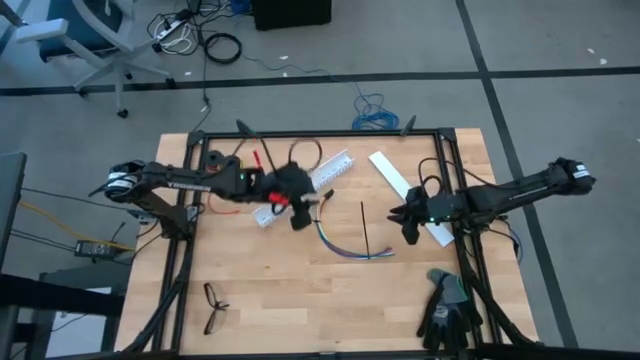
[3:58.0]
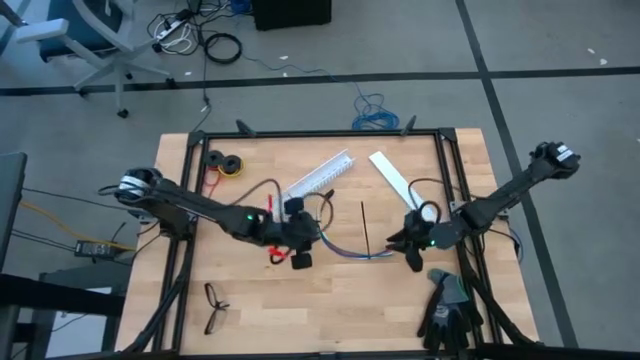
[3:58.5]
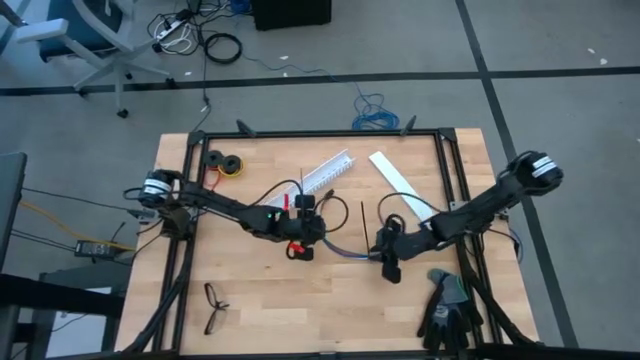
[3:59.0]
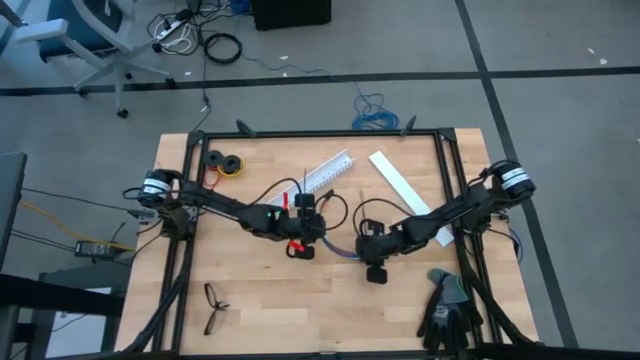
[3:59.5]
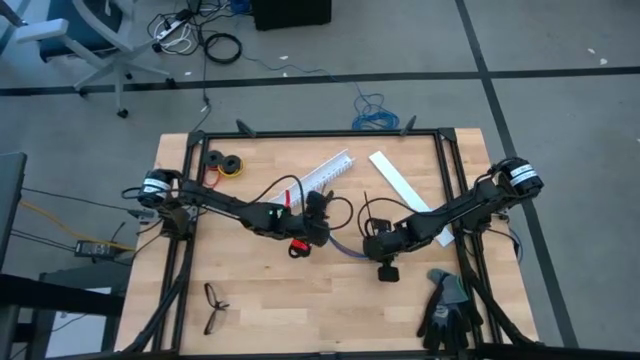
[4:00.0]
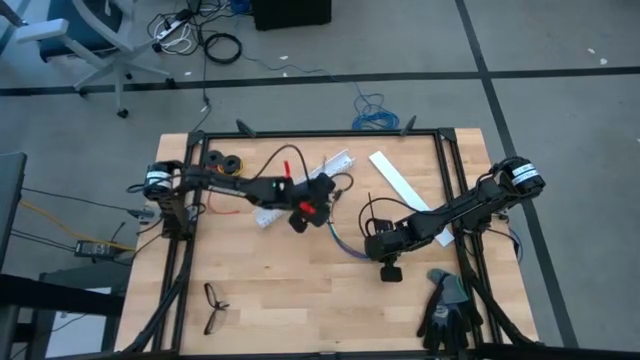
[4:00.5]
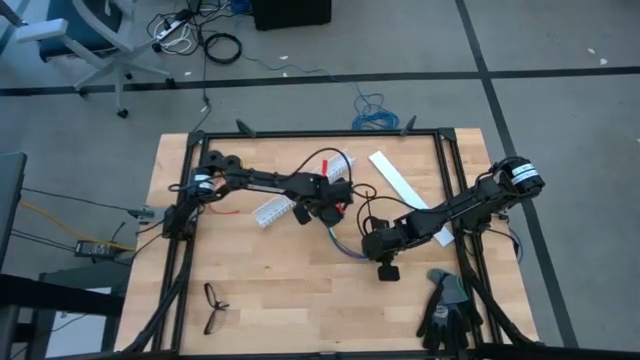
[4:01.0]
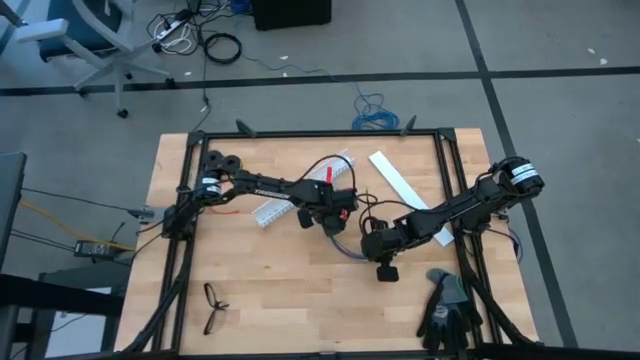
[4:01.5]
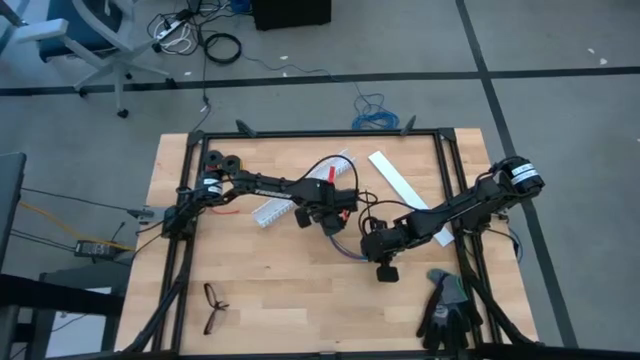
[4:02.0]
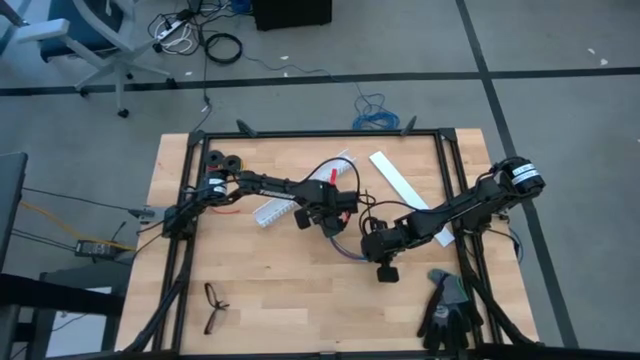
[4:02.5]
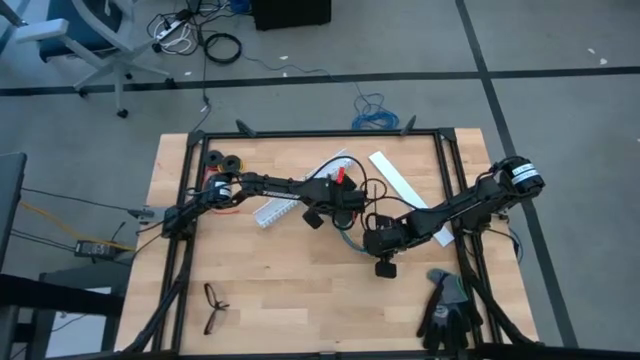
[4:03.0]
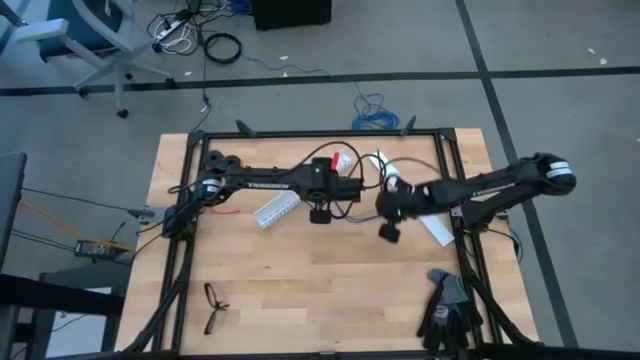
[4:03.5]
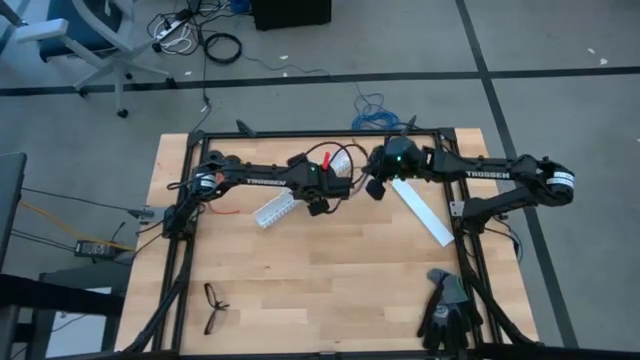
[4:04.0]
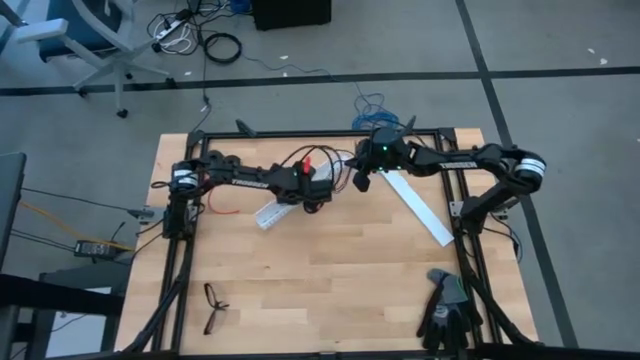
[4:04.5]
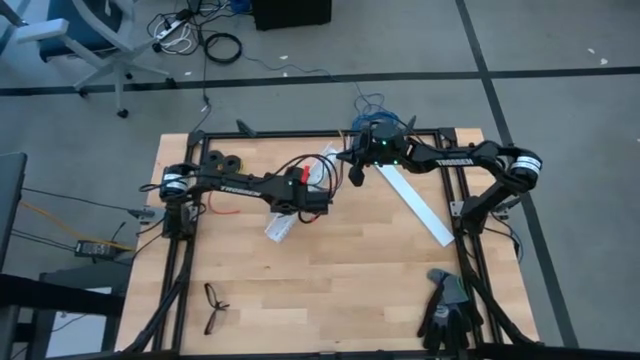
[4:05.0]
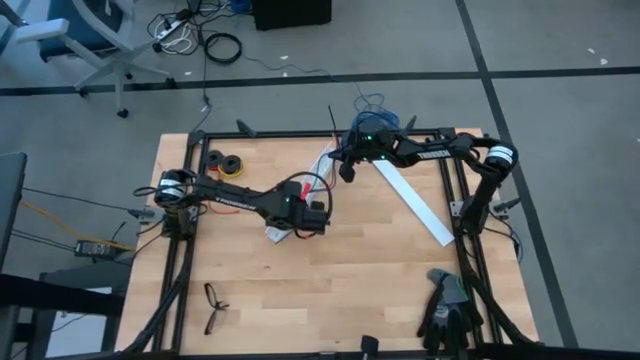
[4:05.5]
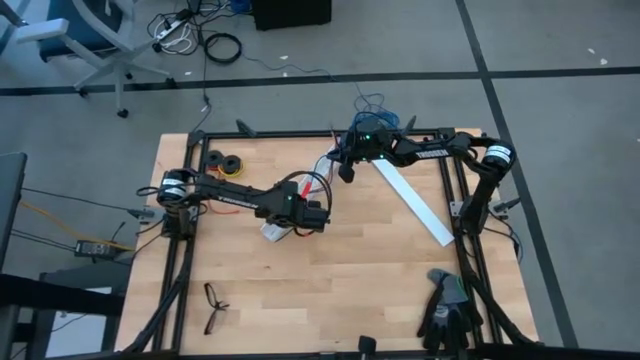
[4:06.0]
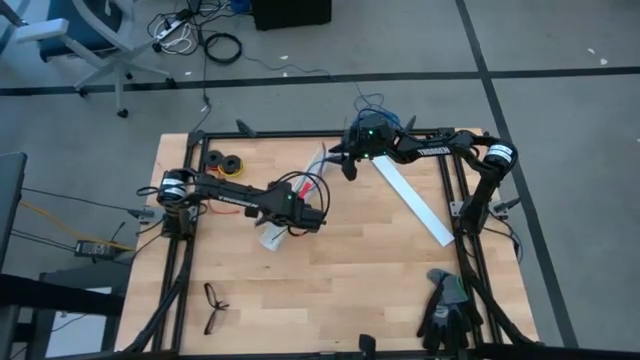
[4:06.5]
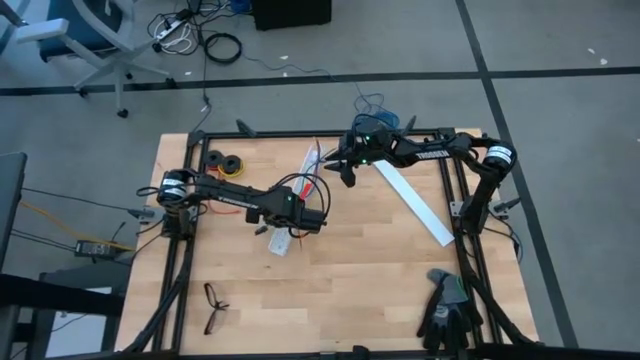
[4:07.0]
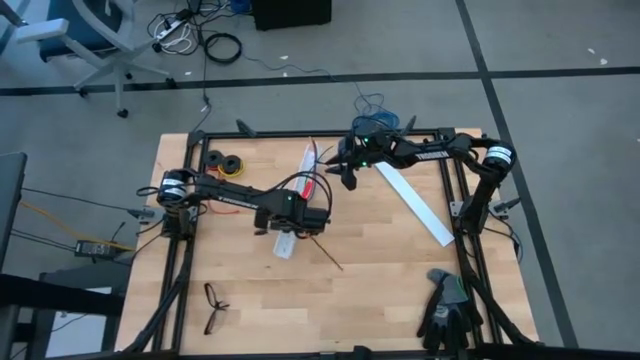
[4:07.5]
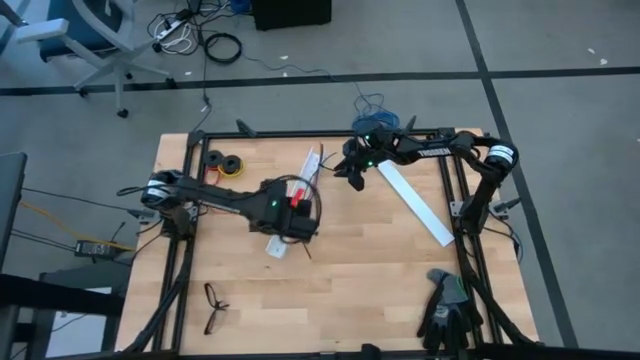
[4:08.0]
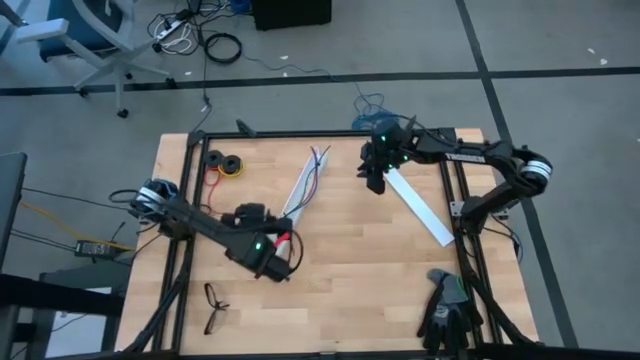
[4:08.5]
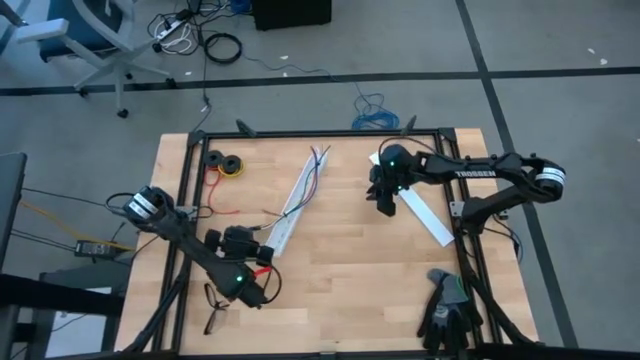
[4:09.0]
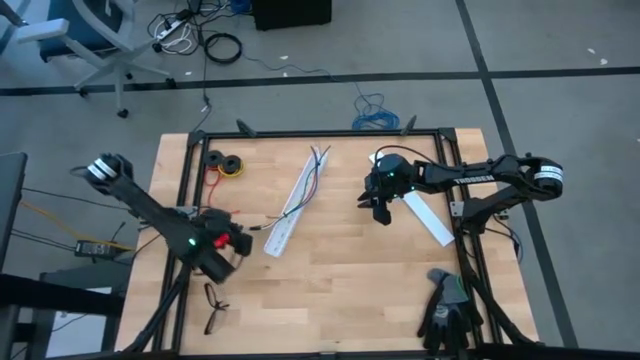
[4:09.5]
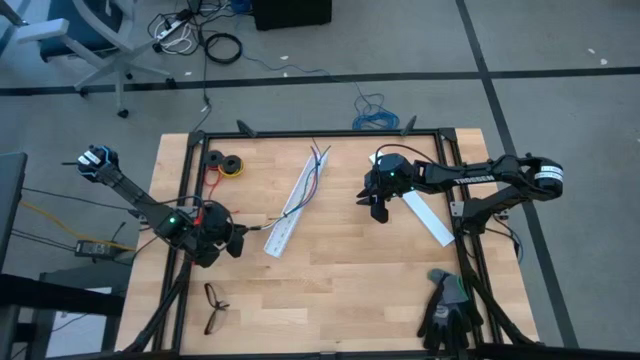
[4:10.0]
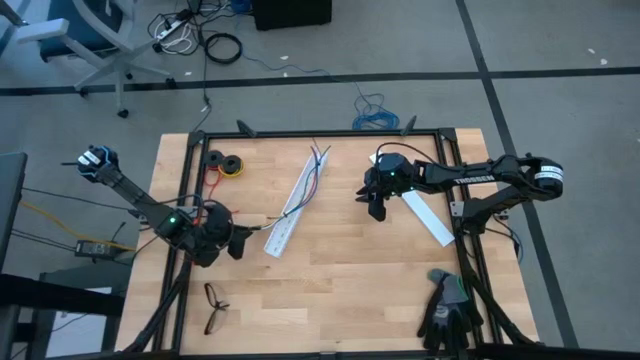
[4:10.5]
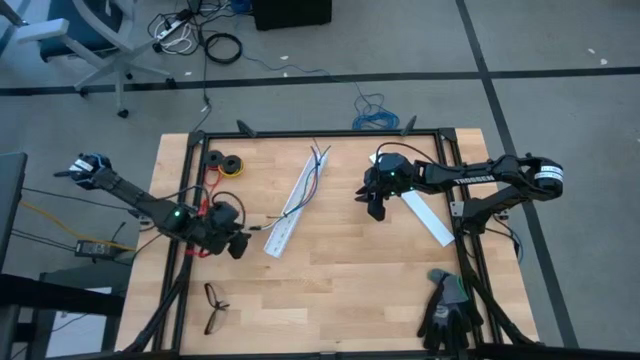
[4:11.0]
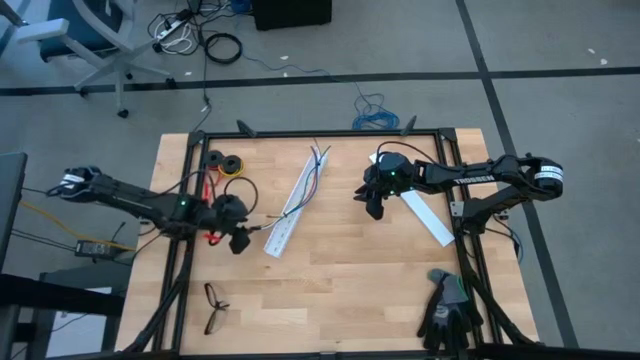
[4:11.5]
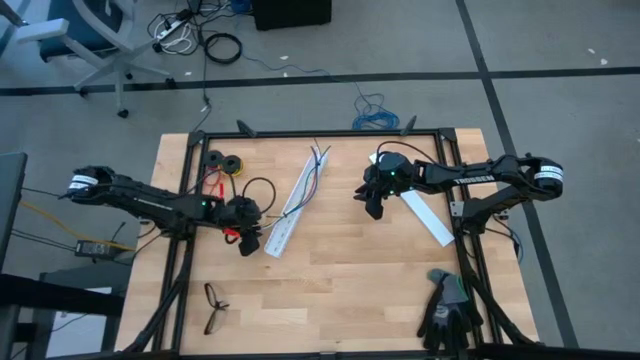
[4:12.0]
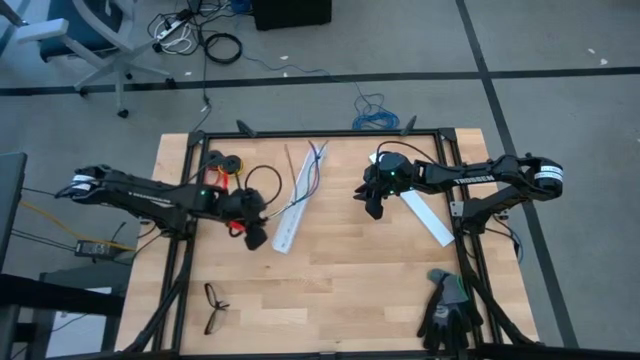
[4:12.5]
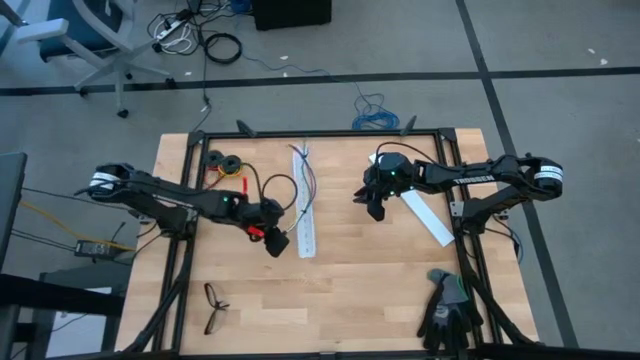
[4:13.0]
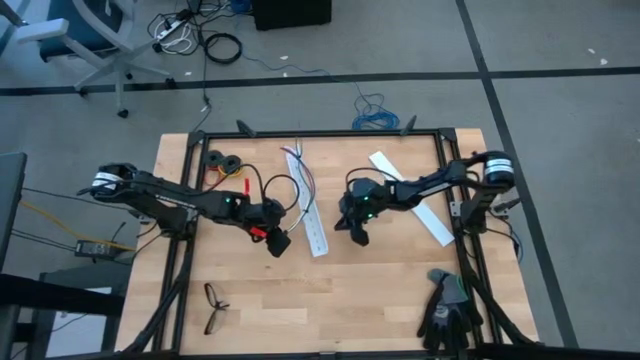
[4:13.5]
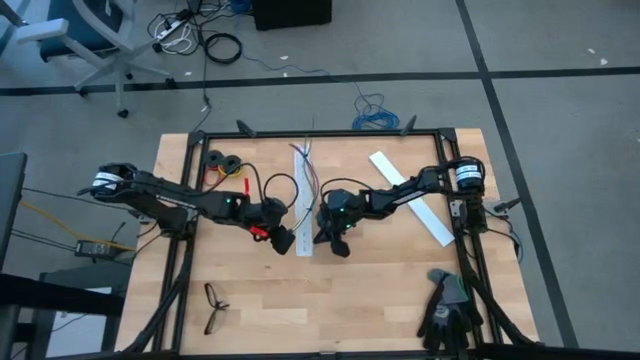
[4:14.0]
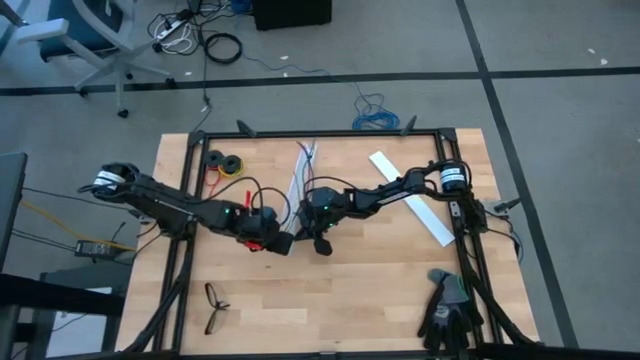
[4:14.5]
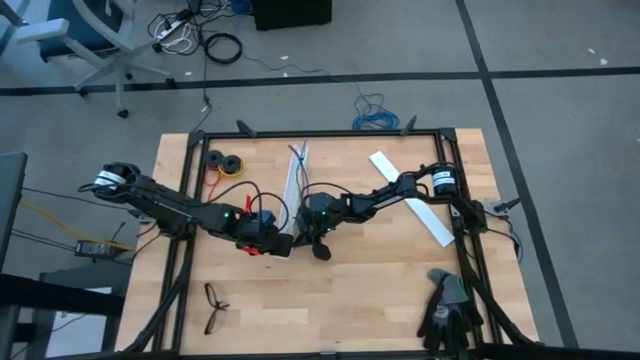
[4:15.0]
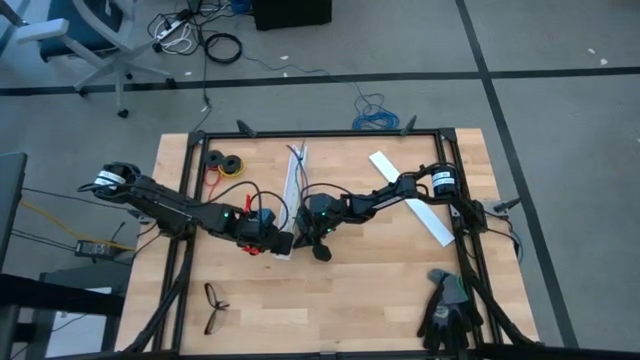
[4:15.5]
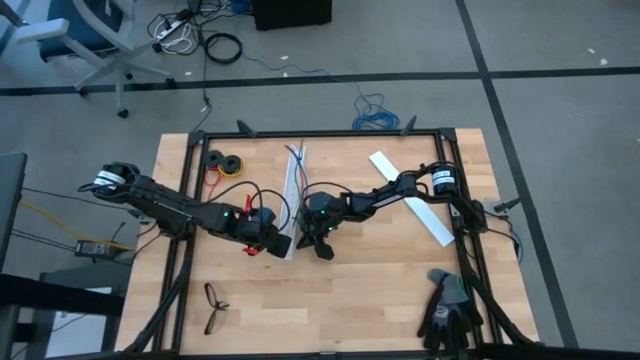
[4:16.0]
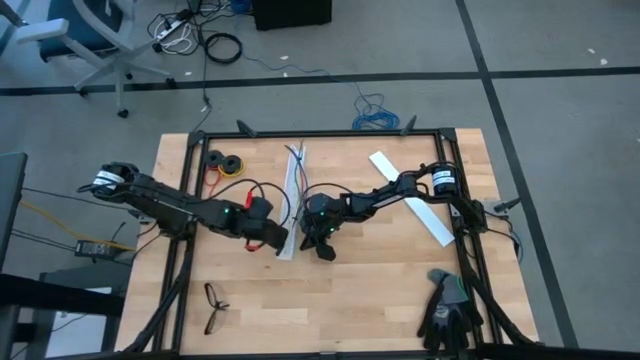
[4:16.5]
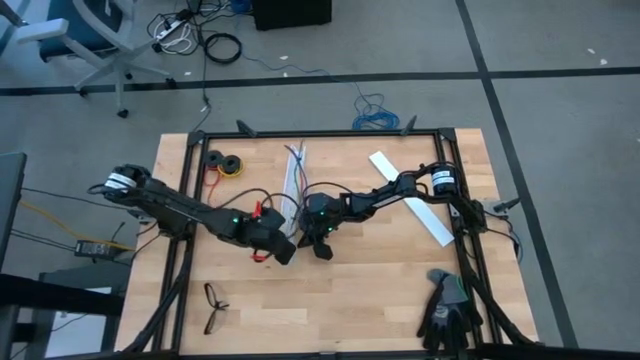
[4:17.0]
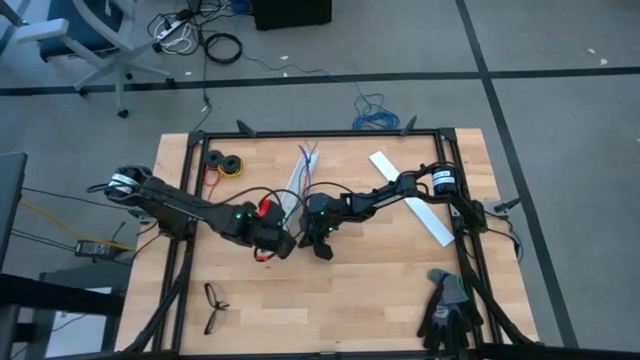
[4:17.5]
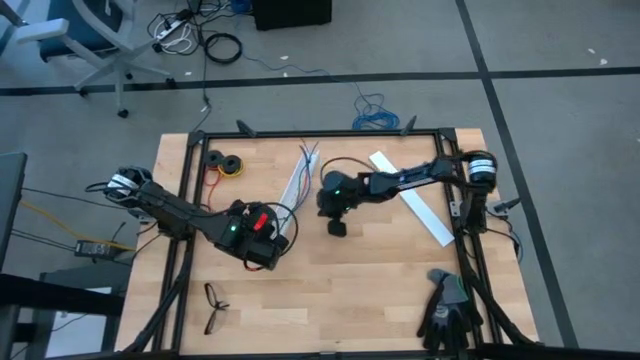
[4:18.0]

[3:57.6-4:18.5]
Task: Ziptie cables
Put the zip tied cable wires into the white cable duct
